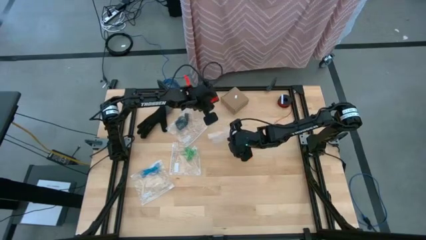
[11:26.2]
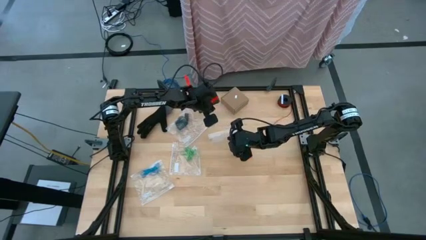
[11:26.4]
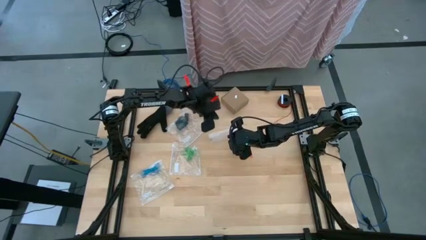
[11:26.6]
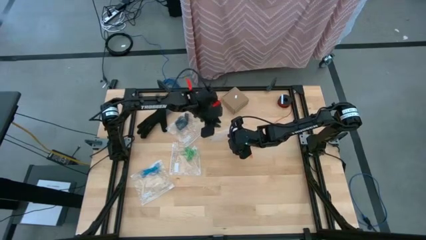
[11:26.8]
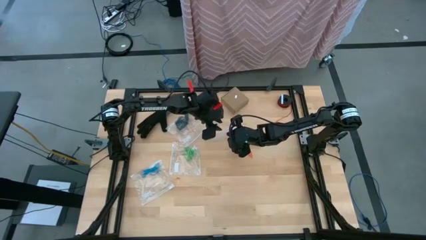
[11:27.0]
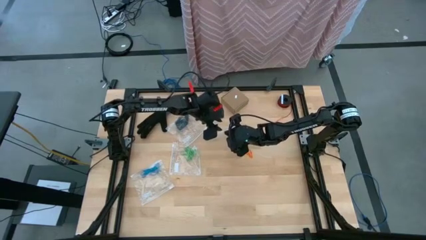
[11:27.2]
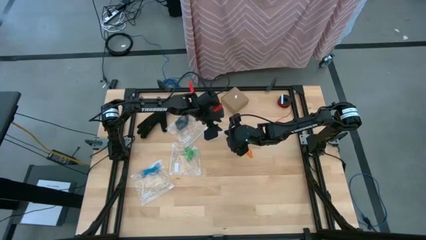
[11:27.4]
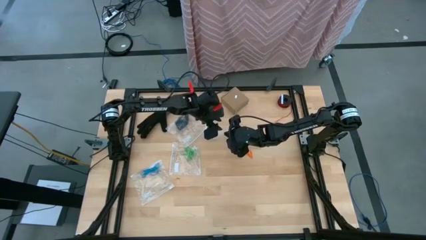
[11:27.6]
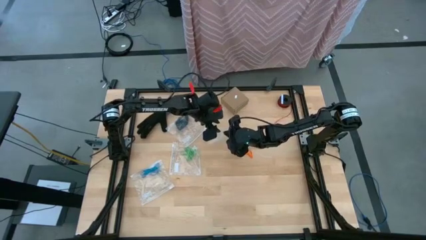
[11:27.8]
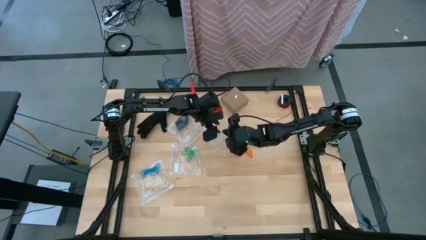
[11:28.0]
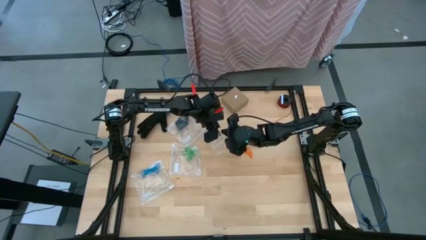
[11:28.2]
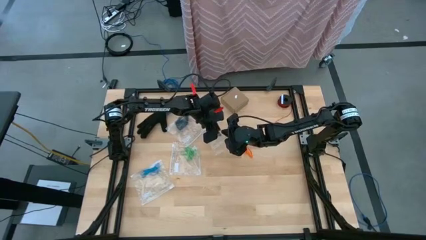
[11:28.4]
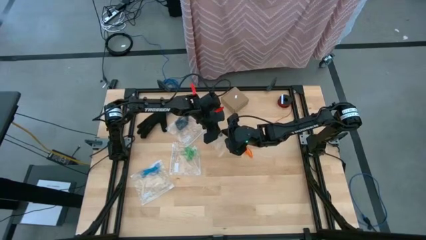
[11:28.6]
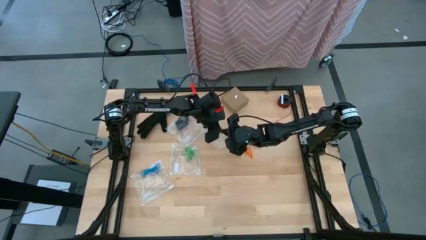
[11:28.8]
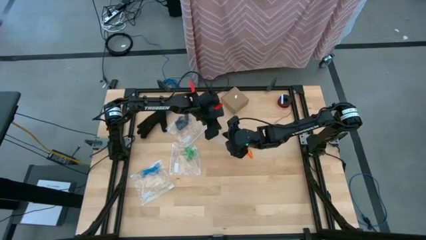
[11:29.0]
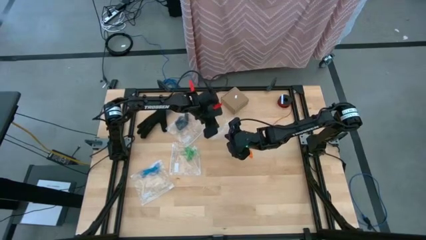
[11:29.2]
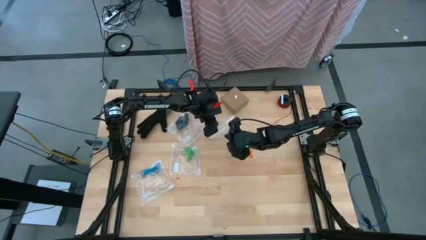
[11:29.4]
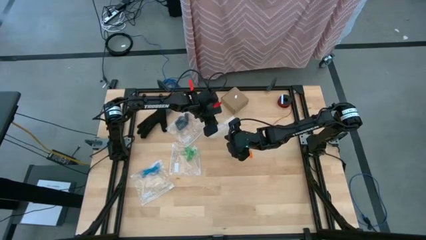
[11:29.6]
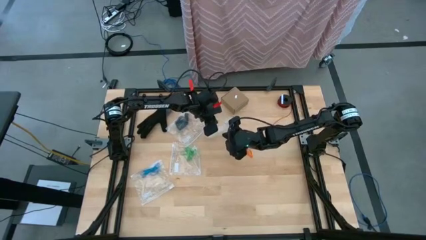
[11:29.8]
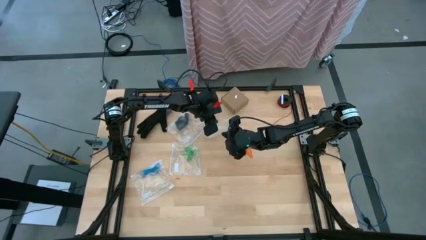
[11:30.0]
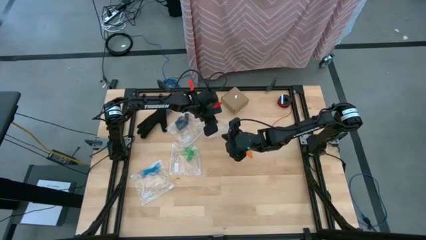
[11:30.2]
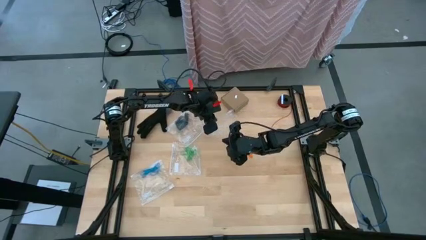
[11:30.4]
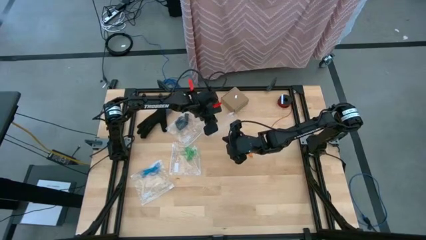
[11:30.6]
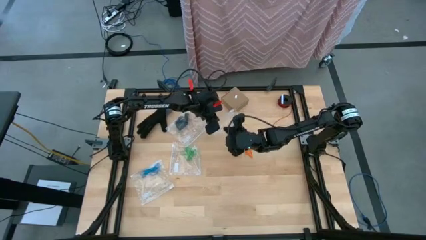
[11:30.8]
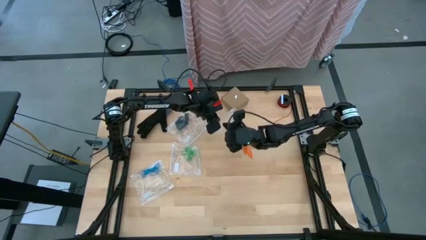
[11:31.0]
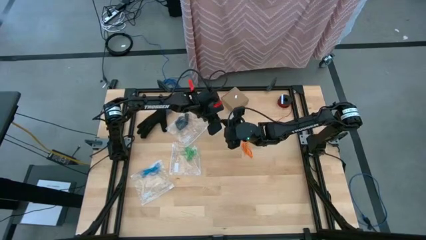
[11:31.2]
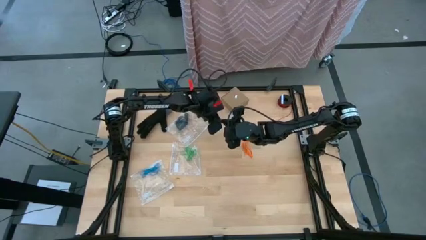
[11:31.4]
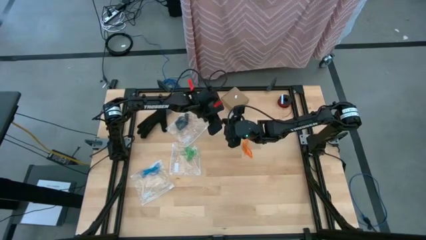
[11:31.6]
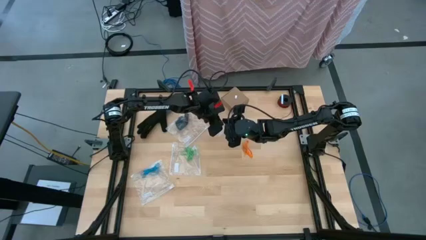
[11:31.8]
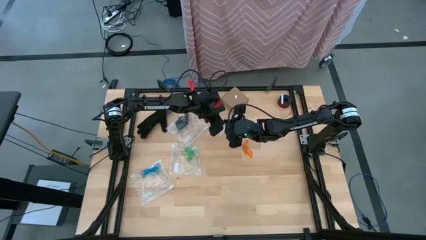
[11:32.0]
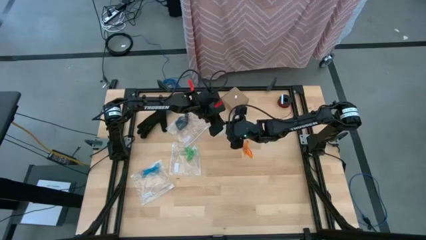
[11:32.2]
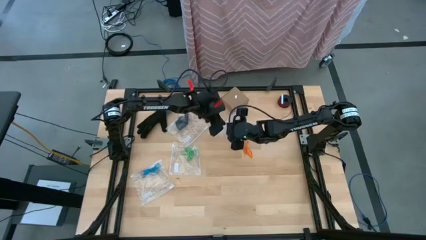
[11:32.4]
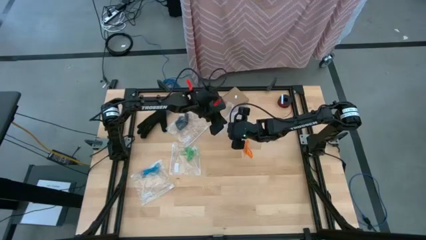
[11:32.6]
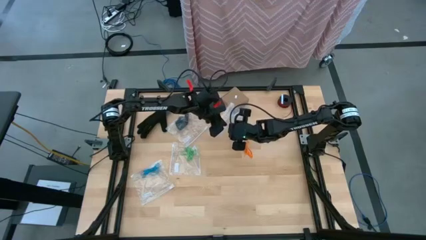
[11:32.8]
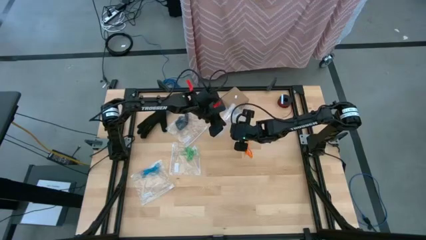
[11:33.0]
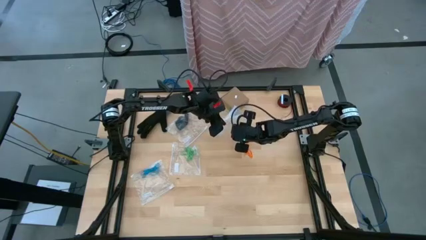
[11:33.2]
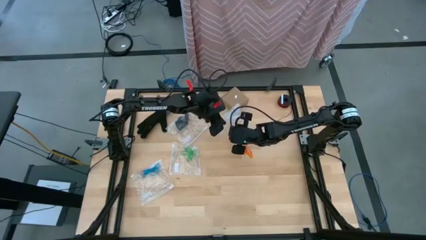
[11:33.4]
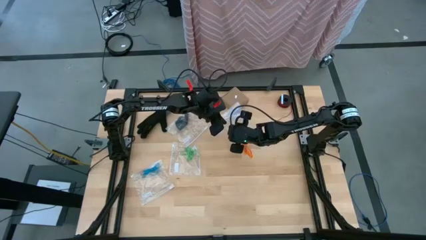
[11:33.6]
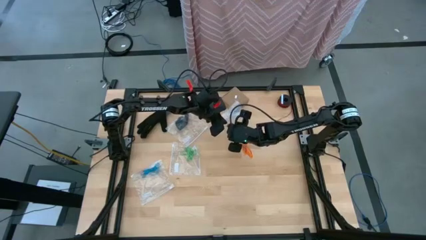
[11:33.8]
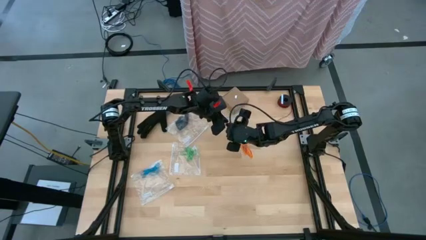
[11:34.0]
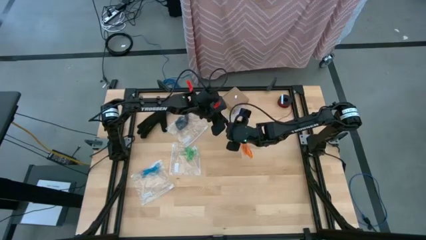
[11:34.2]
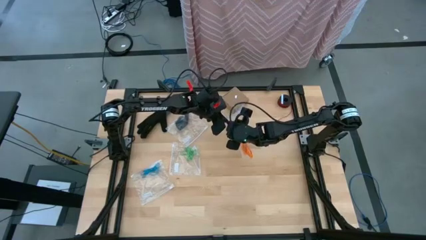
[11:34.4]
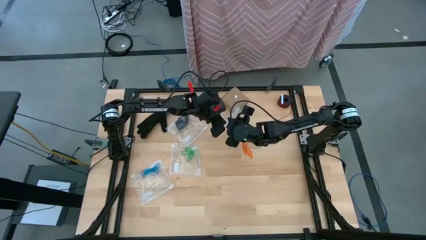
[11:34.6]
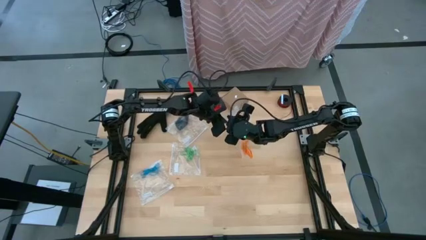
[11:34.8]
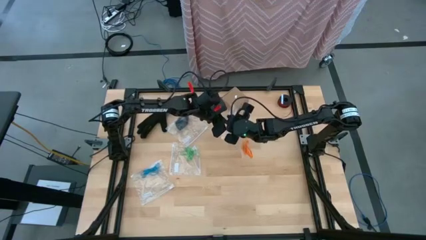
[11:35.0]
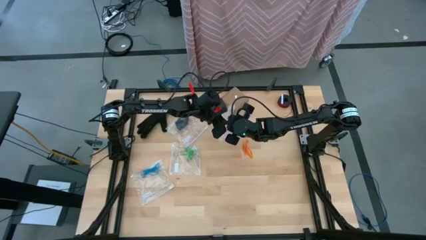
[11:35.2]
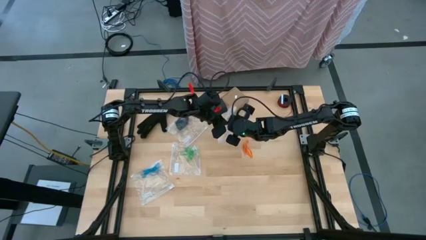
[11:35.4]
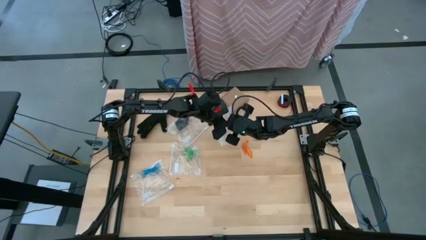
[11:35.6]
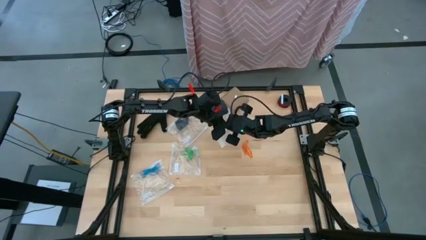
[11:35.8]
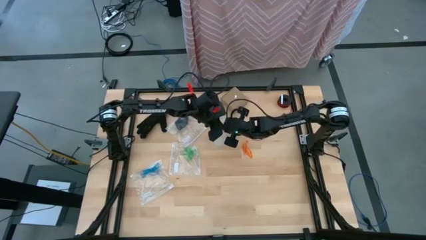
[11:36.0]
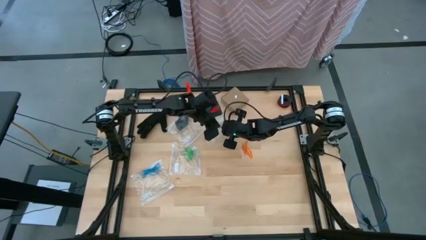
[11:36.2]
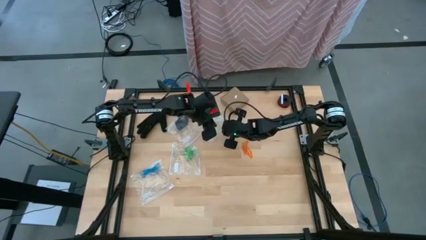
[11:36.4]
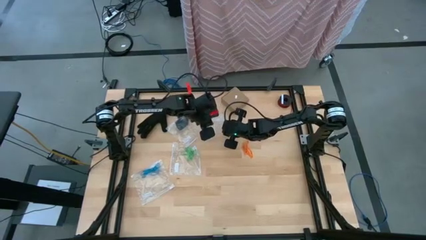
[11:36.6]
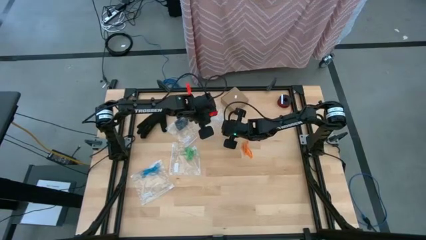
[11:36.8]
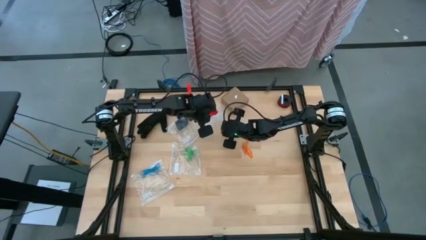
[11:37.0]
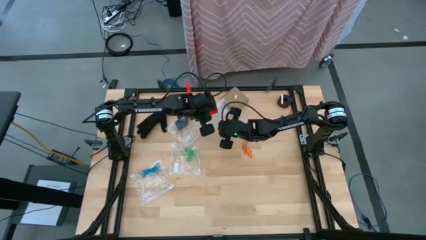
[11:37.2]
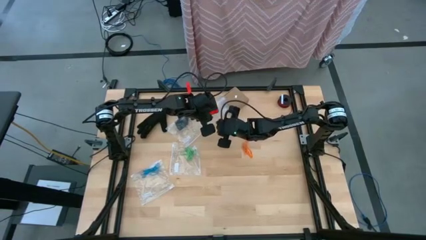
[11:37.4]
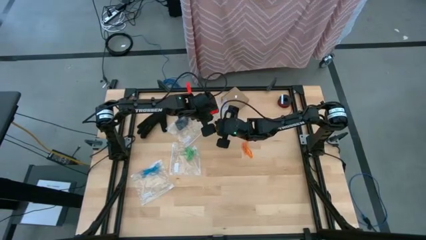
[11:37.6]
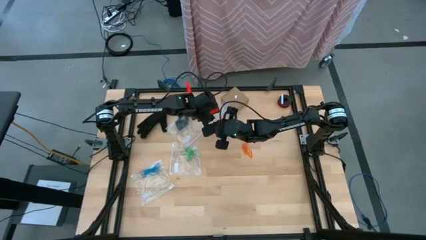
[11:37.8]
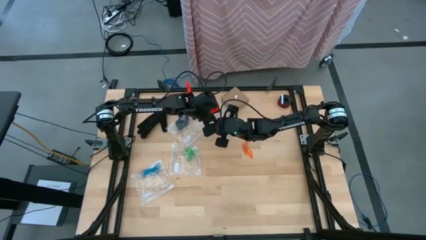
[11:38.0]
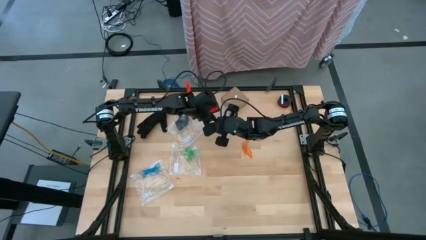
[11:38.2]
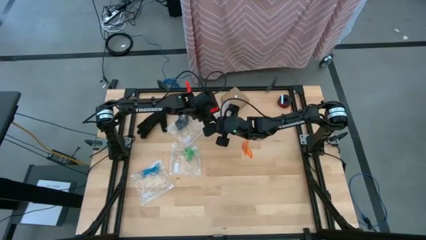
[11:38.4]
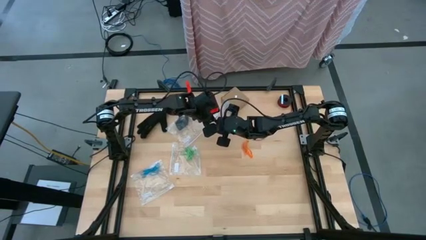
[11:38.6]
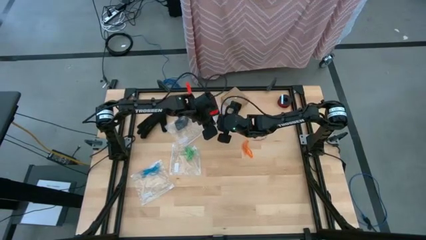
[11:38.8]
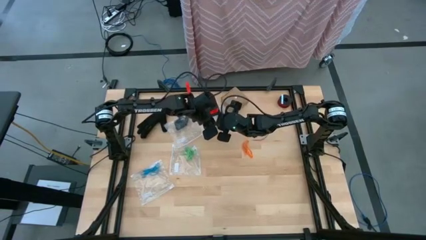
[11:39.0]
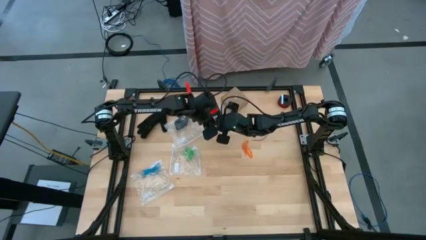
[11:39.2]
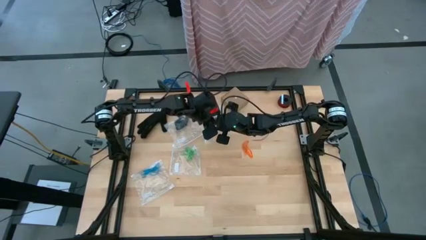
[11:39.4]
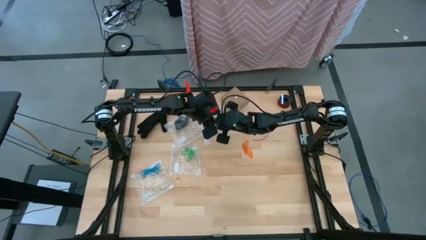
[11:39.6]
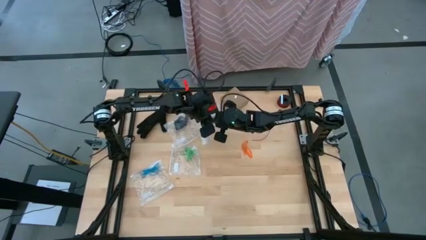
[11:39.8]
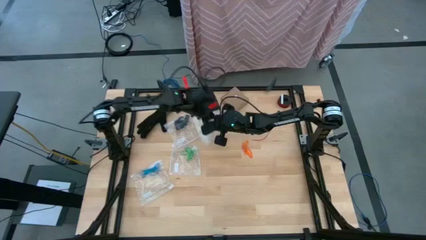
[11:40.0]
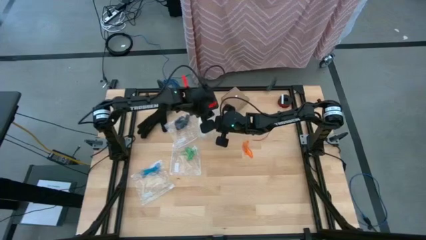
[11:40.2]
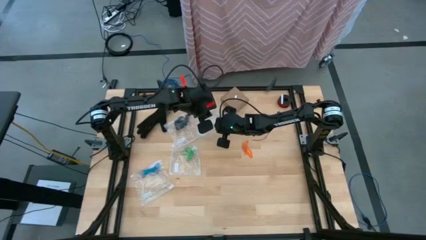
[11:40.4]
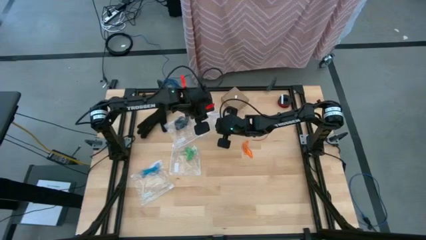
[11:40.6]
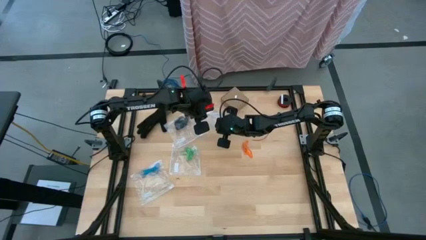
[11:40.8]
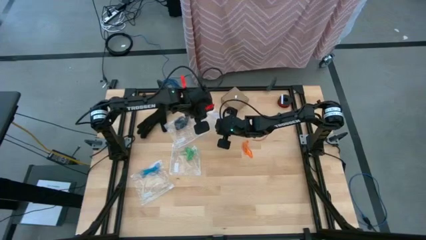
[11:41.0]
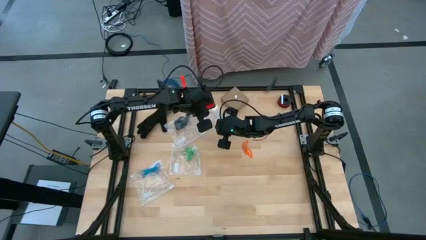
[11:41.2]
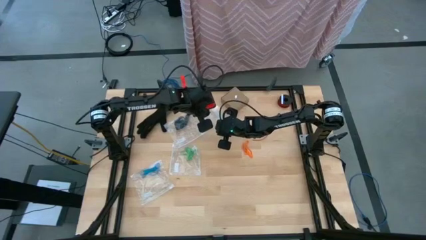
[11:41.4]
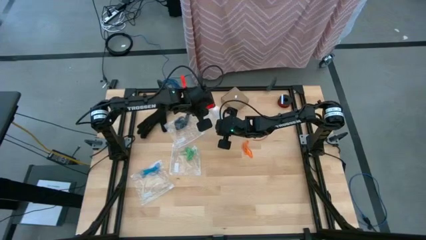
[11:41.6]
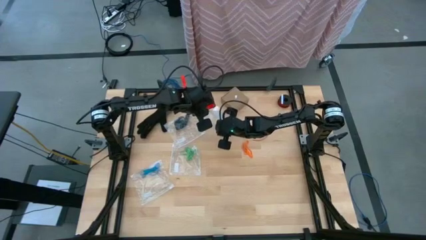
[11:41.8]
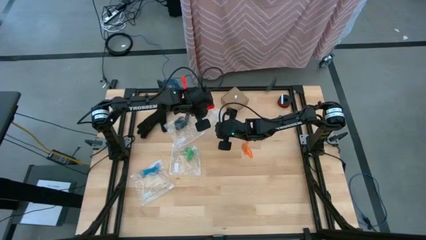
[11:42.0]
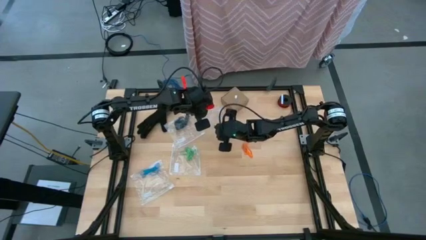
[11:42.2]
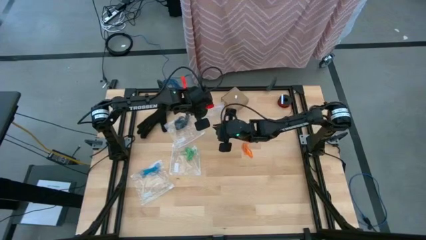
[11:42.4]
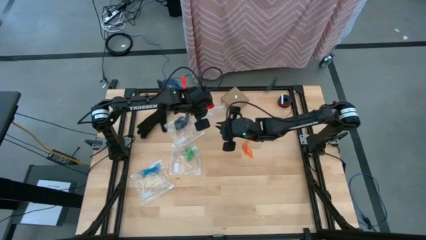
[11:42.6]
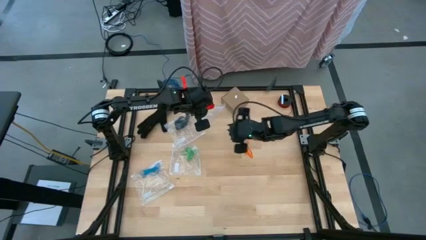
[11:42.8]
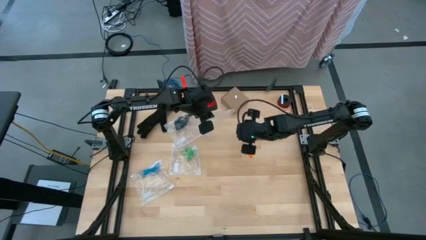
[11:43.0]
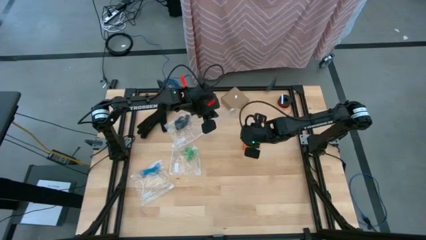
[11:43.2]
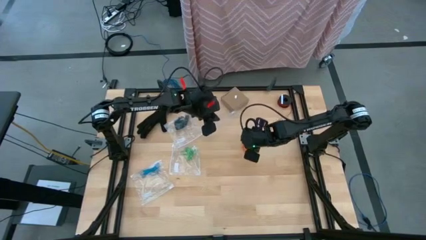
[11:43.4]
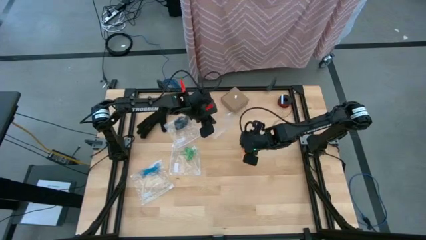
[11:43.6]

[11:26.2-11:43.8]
Task: Sort rubber bands
Open the transparent zip bag
